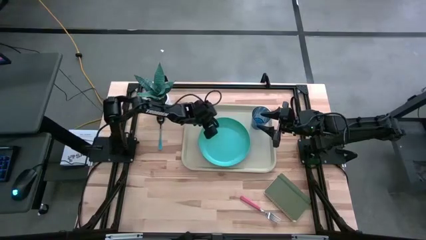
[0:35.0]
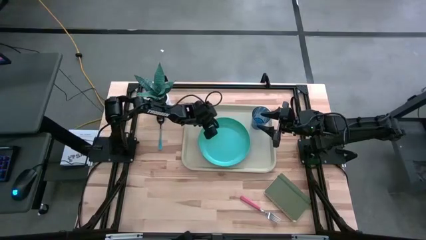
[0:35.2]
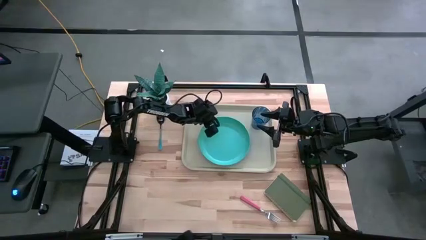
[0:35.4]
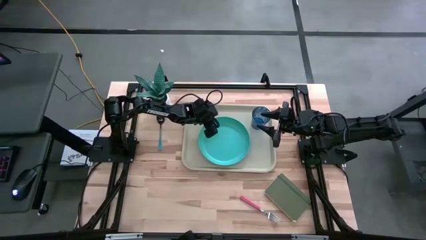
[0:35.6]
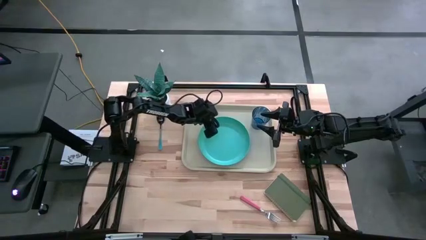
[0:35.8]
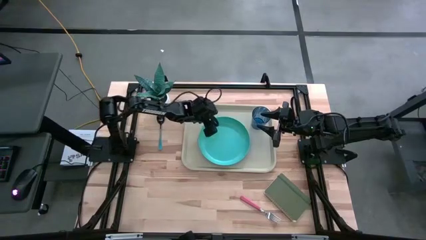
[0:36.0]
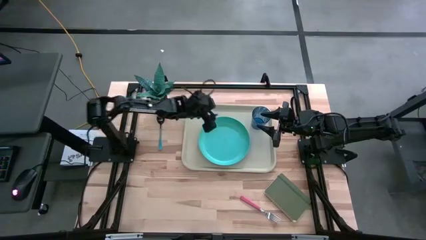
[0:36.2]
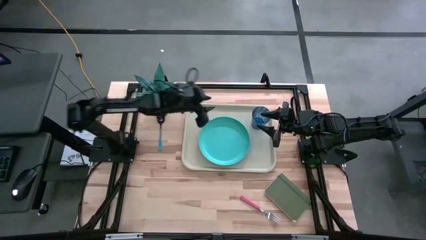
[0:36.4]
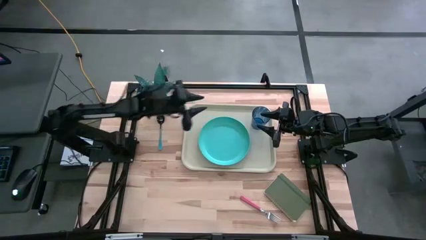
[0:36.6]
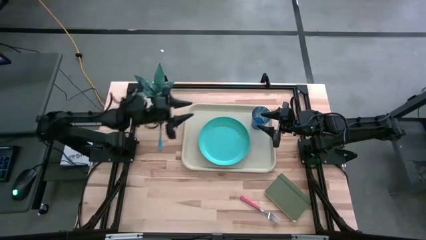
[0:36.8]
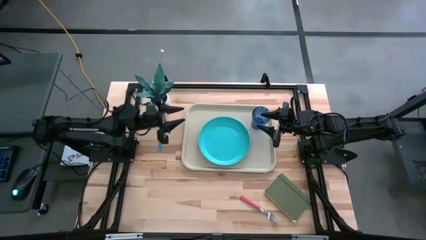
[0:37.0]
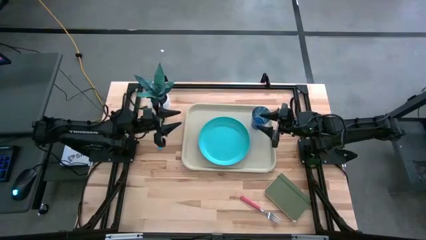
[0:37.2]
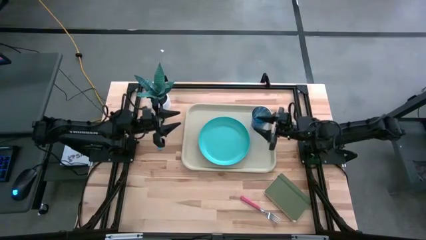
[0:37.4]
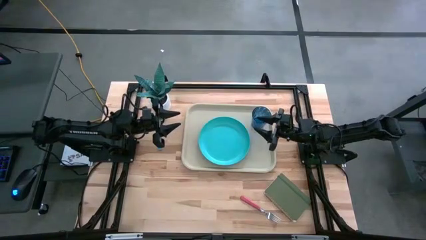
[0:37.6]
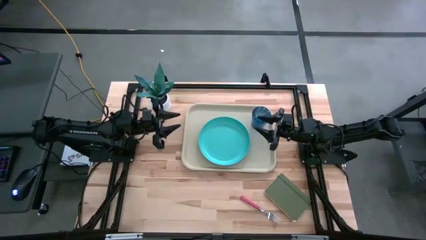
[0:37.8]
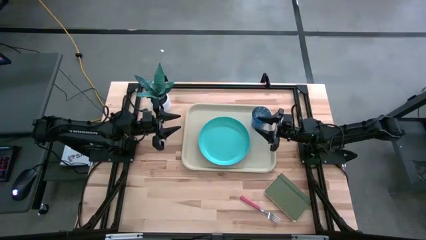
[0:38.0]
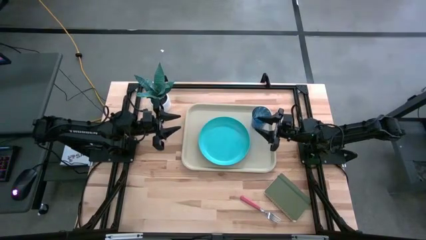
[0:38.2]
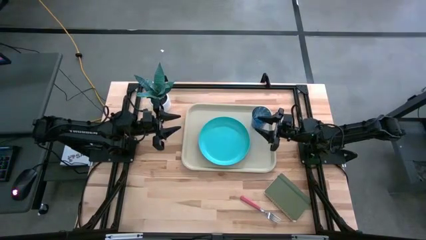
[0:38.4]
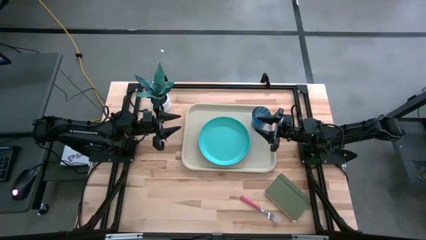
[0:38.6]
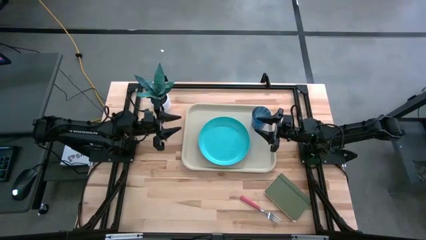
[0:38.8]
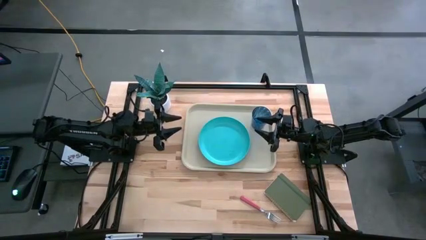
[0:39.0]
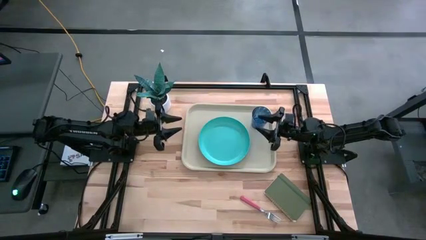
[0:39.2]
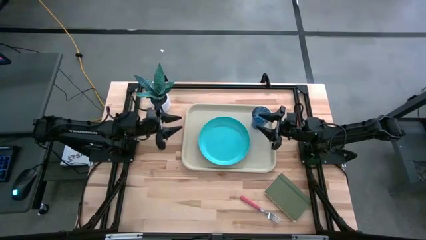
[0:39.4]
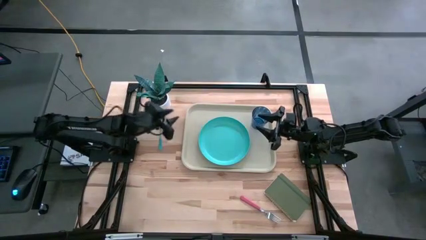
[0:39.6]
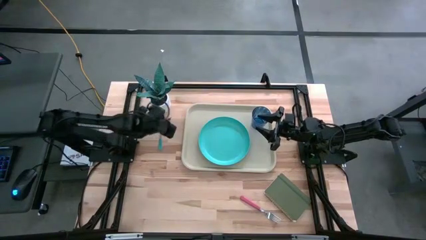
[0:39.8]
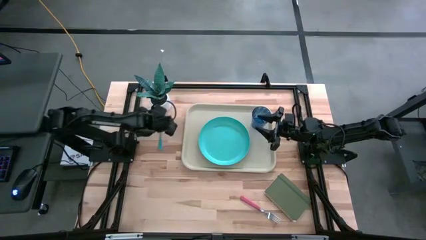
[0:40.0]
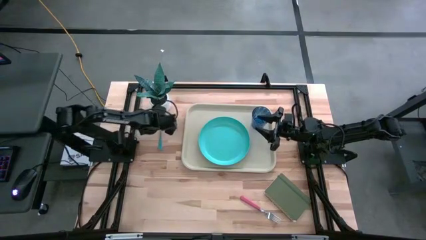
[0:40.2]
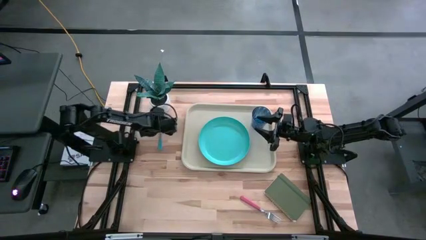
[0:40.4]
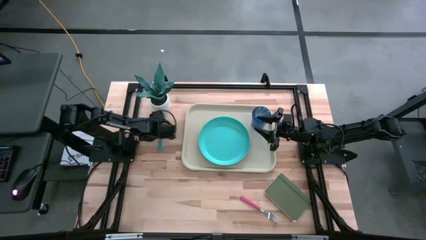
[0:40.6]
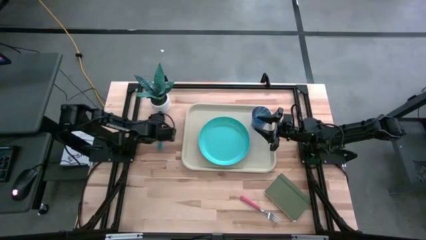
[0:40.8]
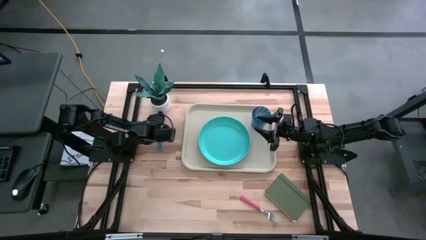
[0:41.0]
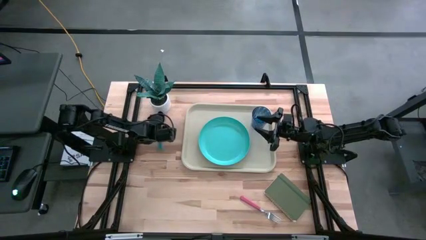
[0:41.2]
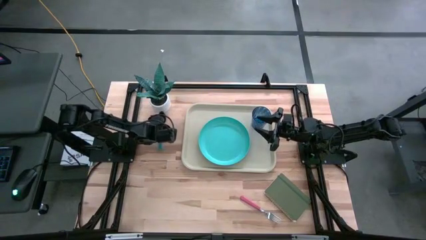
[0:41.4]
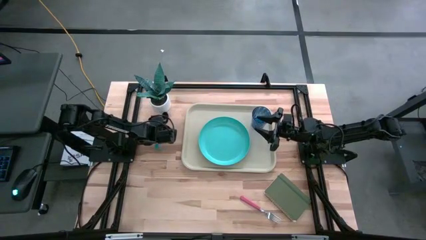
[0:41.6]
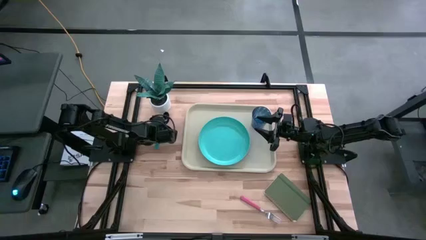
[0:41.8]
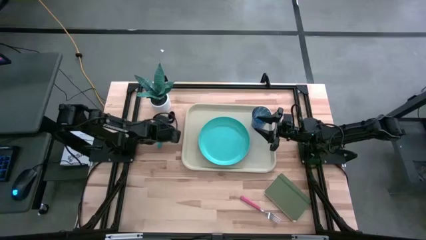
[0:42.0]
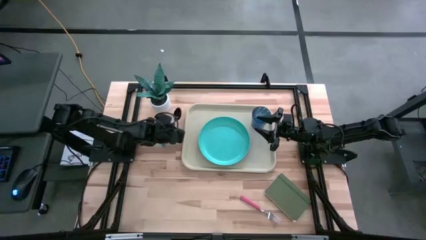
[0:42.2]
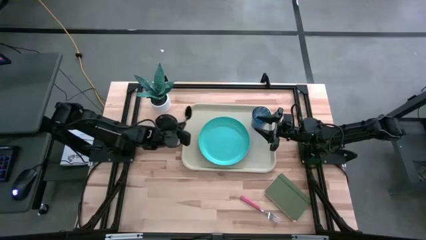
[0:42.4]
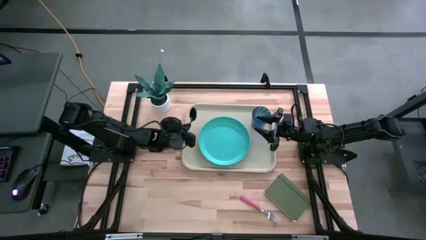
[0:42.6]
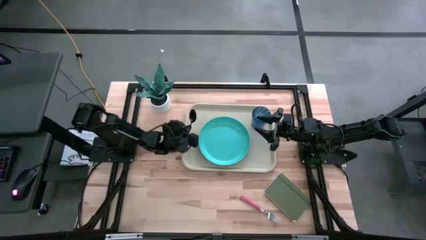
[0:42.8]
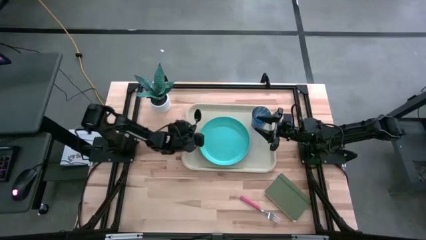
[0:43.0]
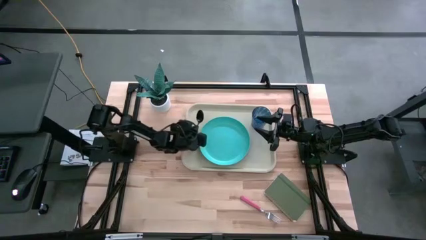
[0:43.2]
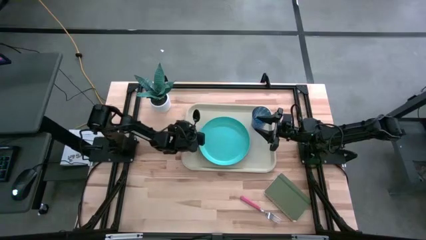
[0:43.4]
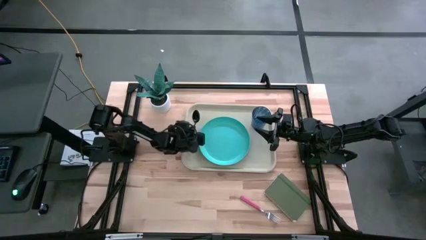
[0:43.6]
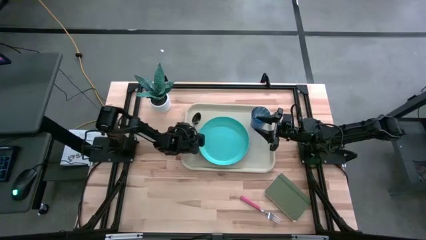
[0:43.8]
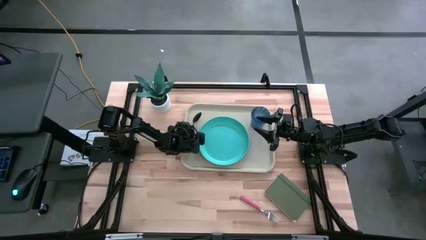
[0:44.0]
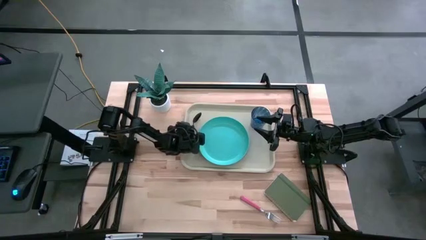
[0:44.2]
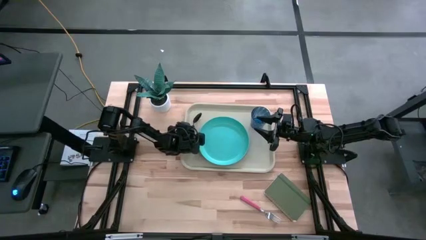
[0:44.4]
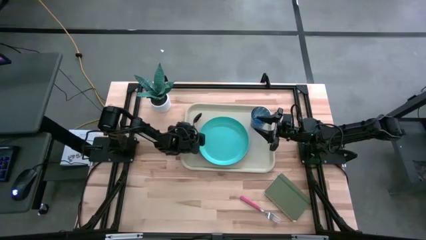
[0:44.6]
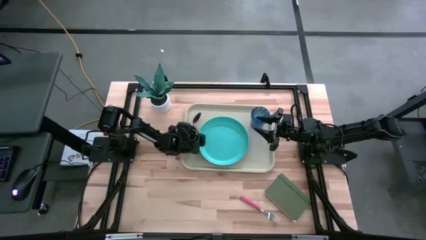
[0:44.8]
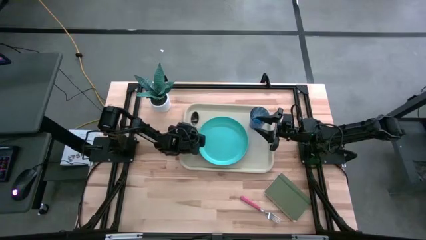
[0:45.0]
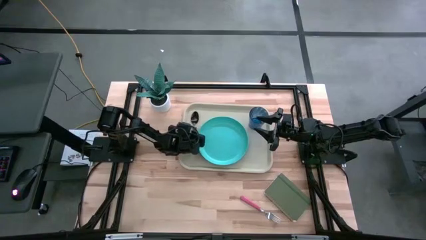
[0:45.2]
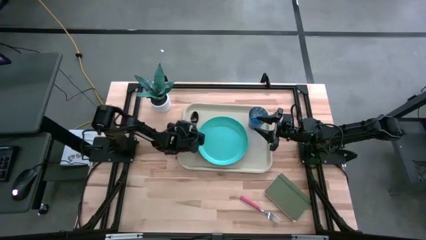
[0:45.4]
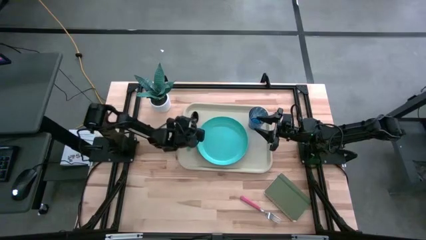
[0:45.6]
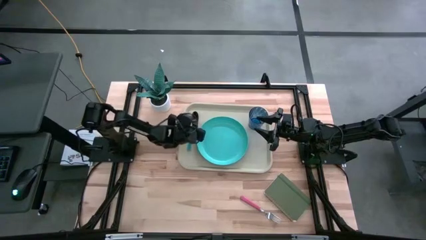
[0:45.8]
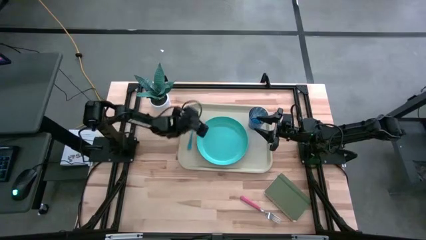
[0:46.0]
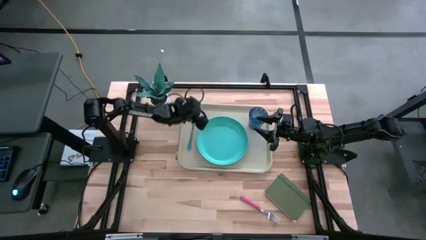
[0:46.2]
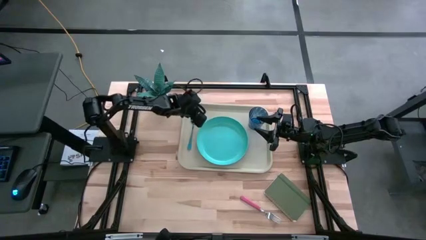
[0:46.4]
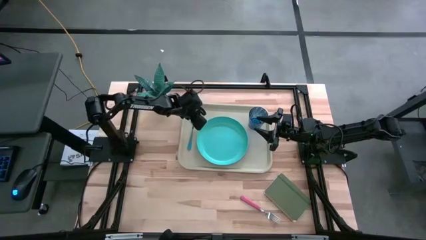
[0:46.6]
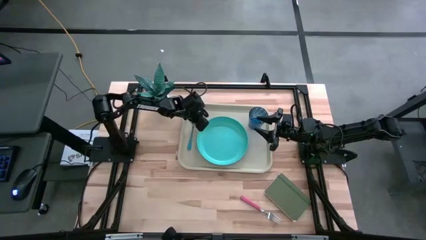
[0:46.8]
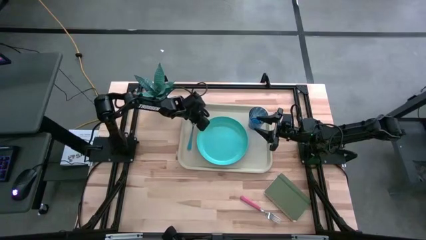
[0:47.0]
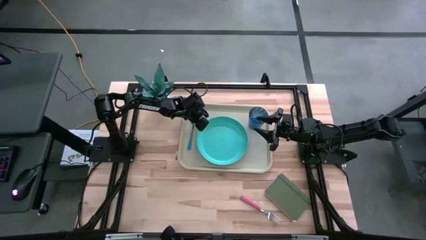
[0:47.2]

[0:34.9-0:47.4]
Task: Pick and place plate/cup/fork/spoon on tray
Put the blue spoon to the left of the light blue plate on the light brown serving tray
